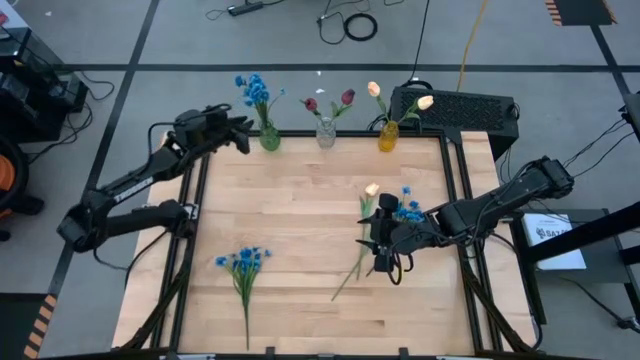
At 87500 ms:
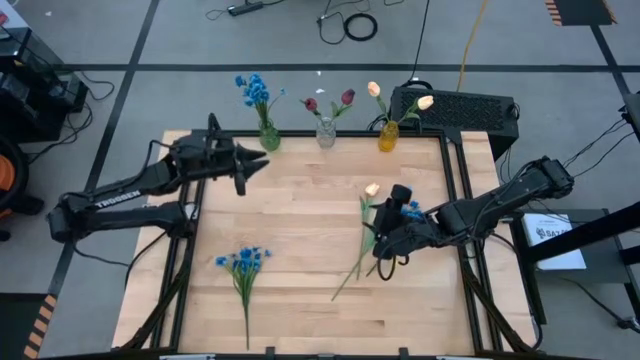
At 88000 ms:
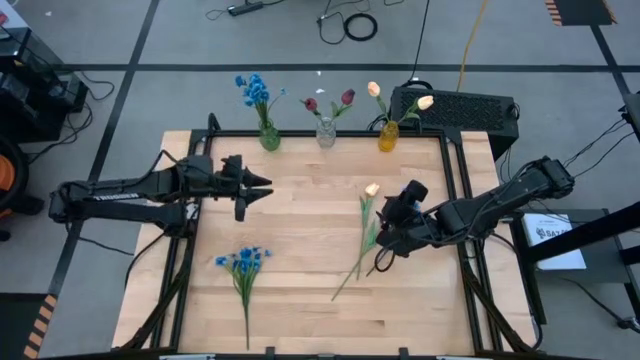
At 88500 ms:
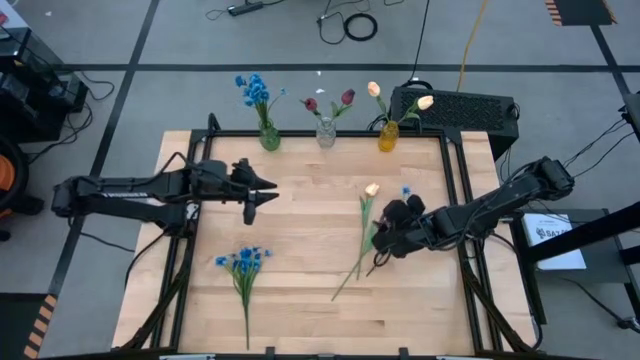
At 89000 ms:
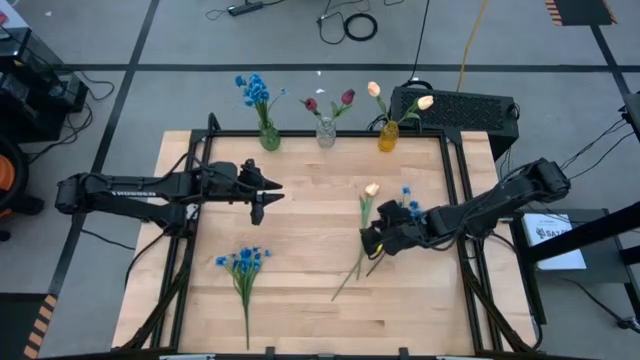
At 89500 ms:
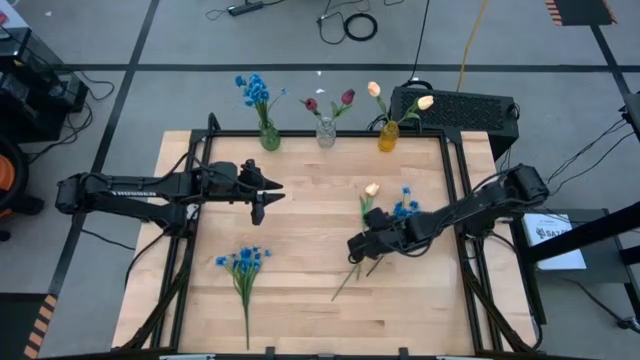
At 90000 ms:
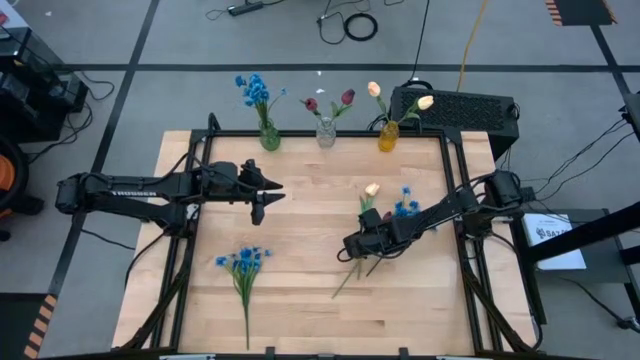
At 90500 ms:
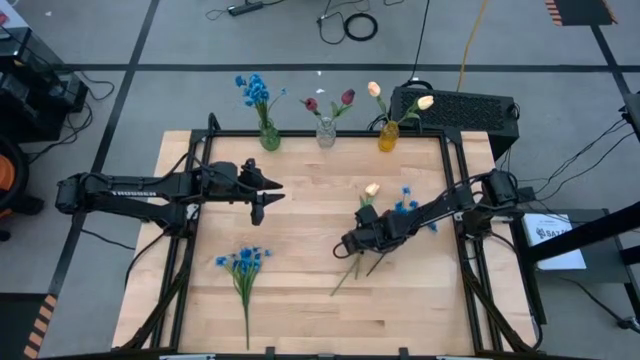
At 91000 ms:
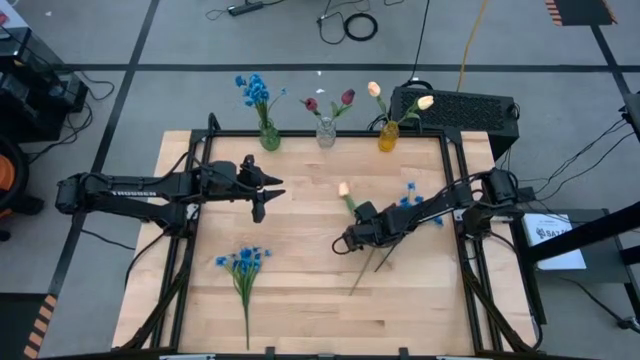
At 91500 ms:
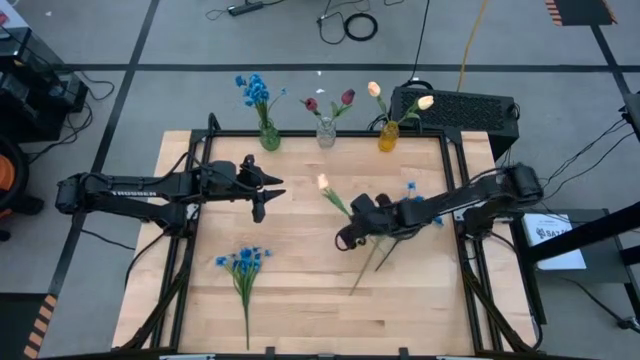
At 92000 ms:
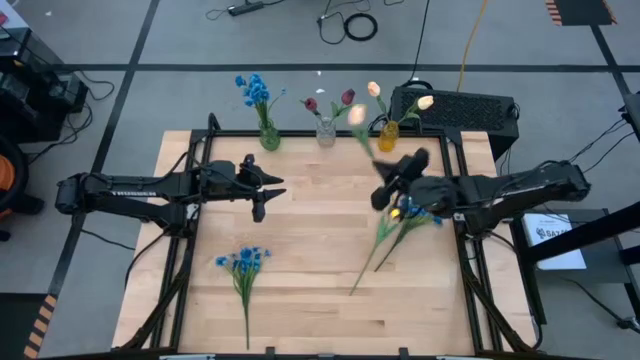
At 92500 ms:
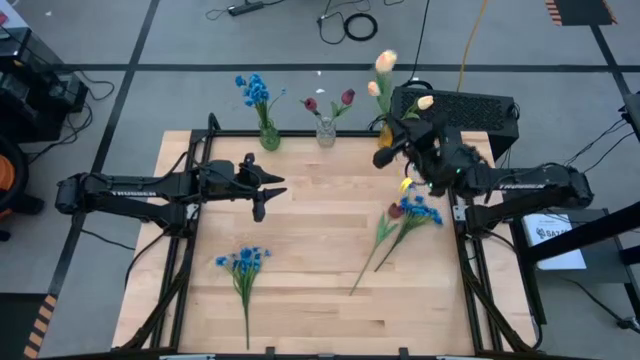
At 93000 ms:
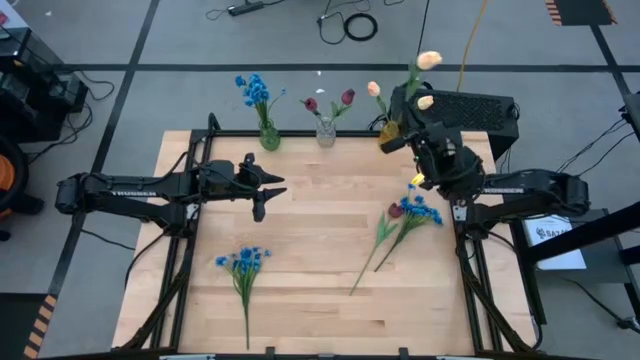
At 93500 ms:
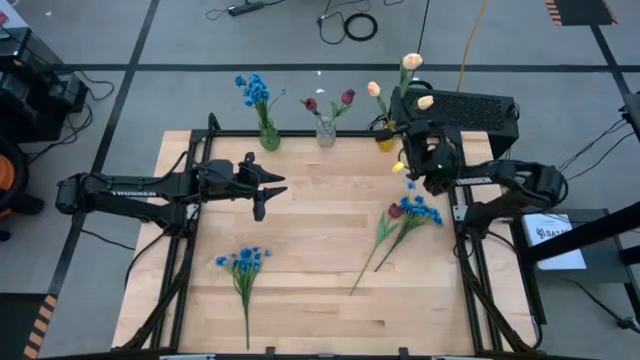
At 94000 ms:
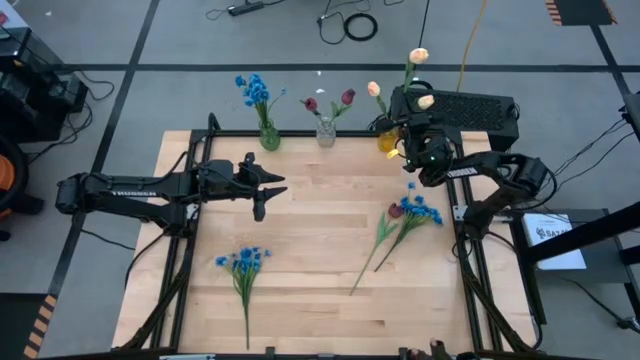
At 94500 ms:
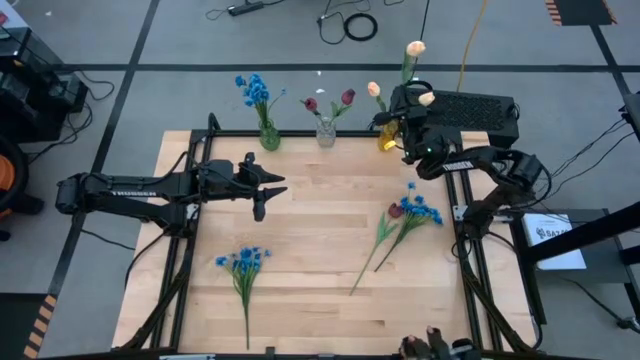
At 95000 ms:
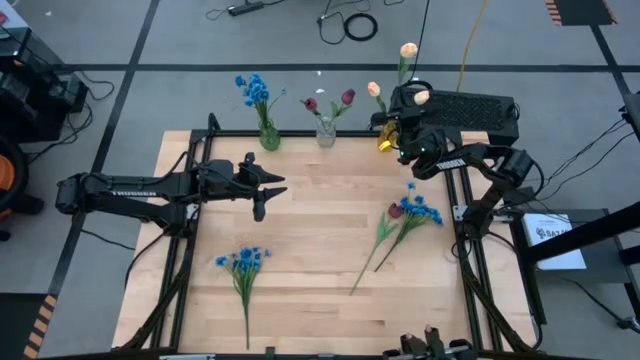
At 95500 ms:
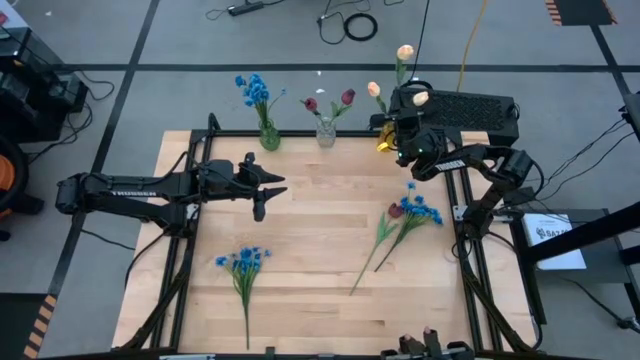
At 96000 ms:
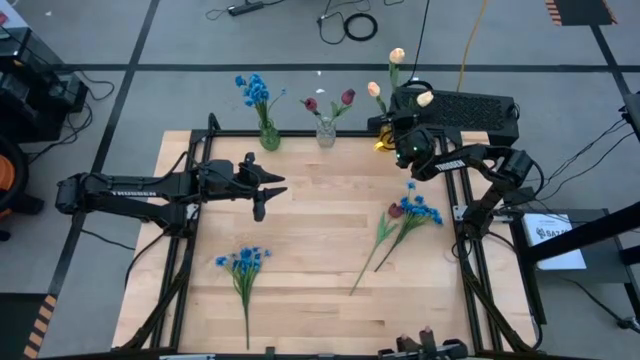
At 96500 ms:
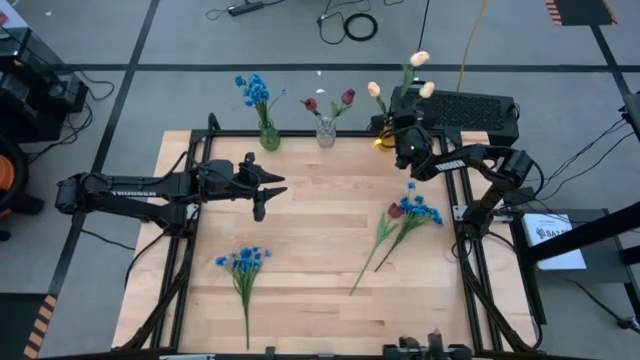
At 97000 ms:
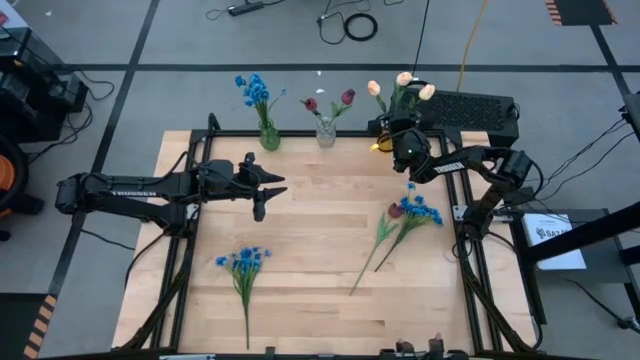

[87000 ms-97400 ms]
Task: Sort flowers into vase by color
Put the yellow tulip into the orange vase

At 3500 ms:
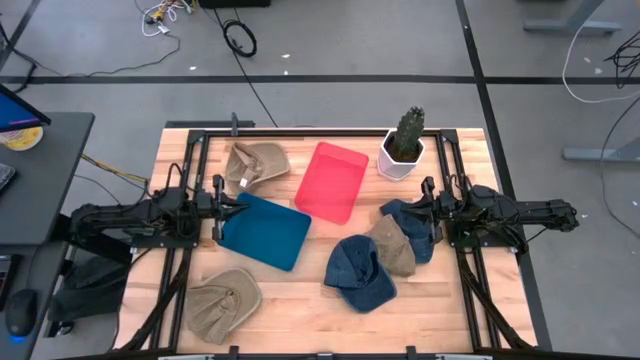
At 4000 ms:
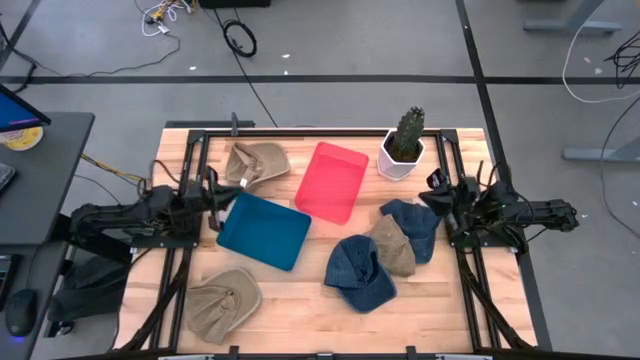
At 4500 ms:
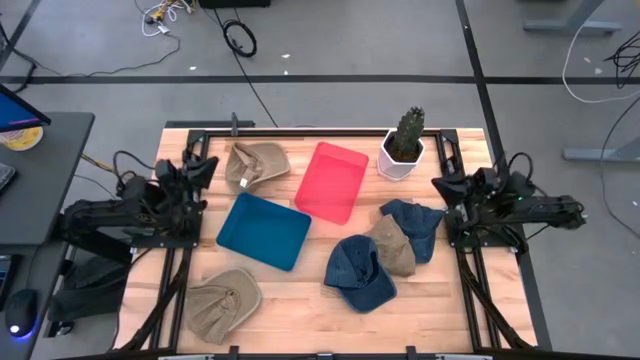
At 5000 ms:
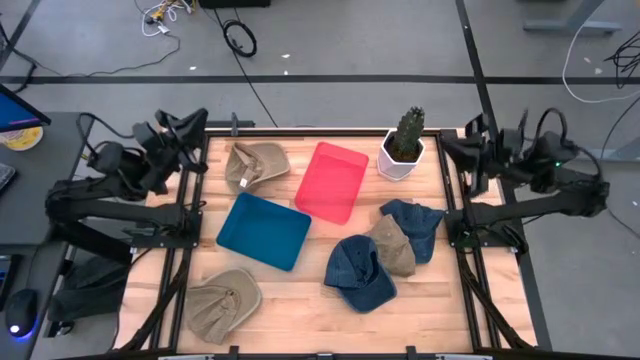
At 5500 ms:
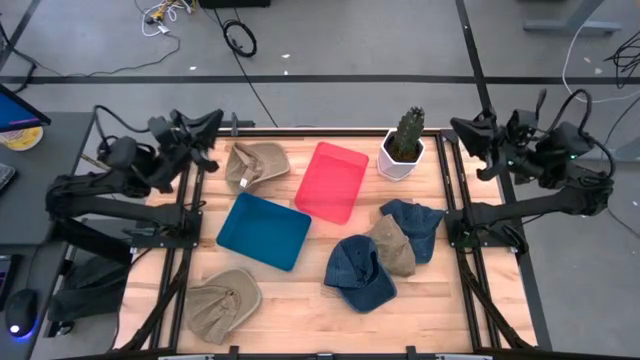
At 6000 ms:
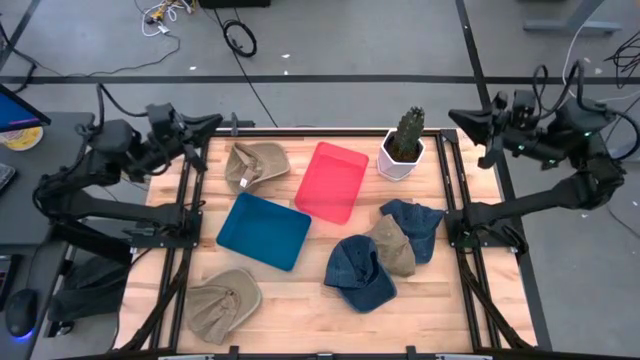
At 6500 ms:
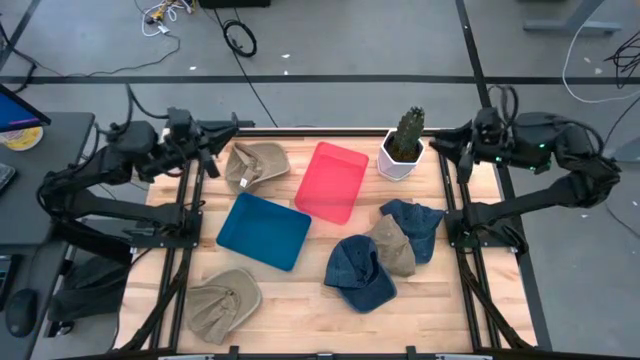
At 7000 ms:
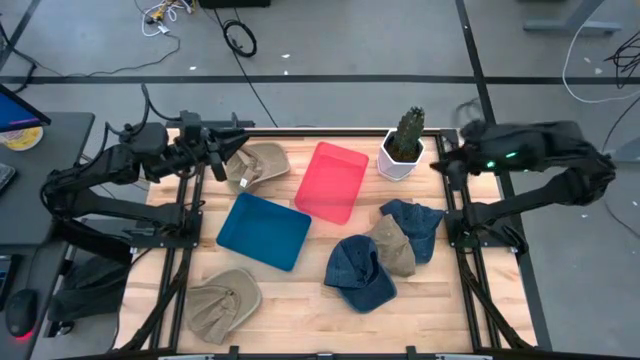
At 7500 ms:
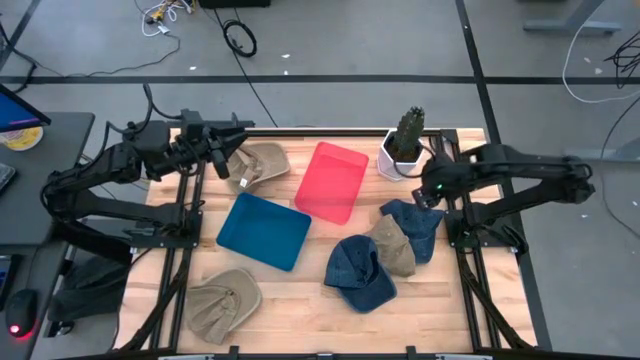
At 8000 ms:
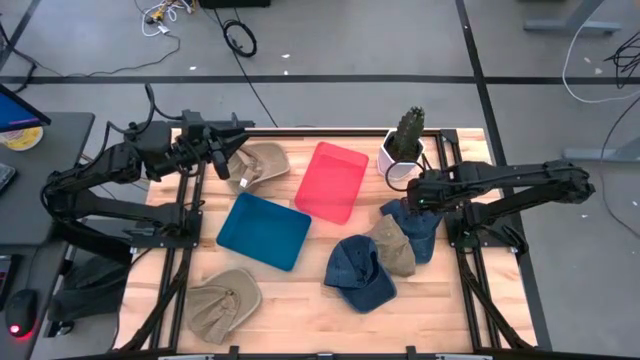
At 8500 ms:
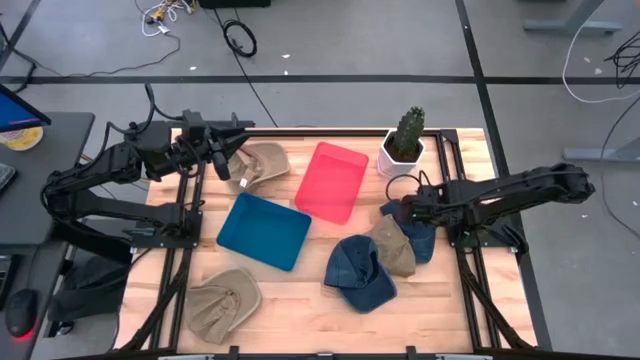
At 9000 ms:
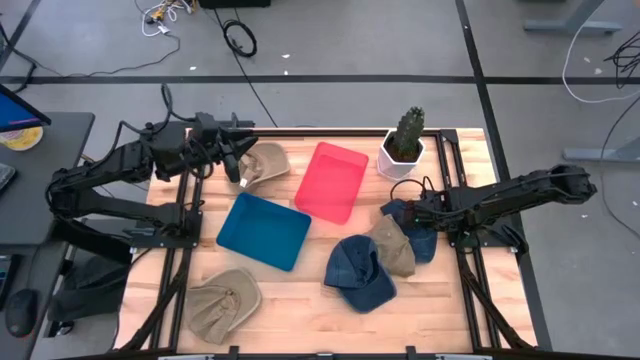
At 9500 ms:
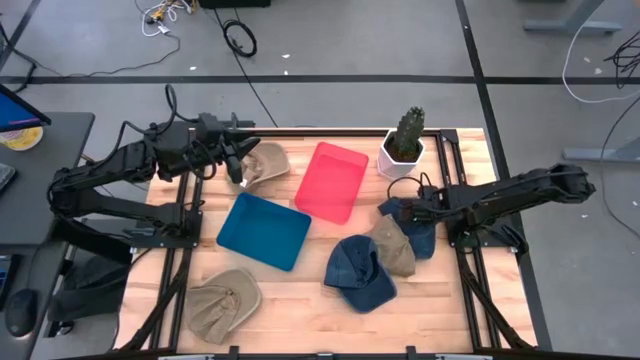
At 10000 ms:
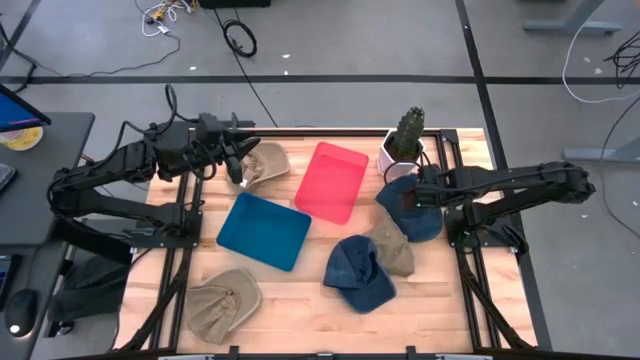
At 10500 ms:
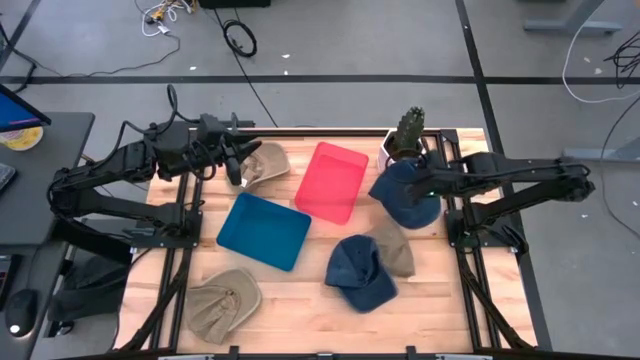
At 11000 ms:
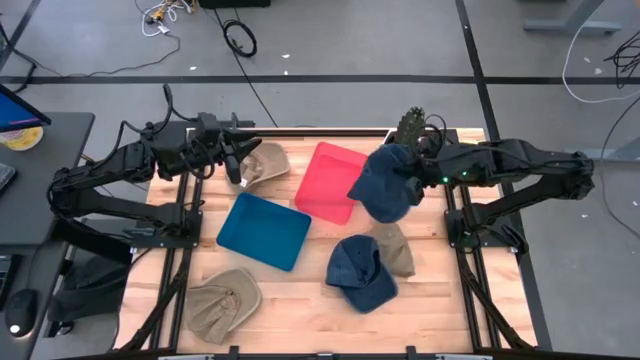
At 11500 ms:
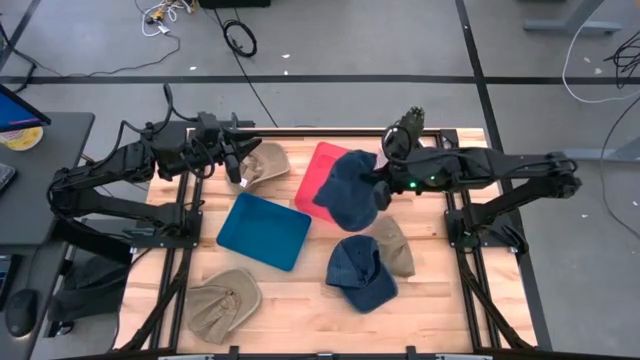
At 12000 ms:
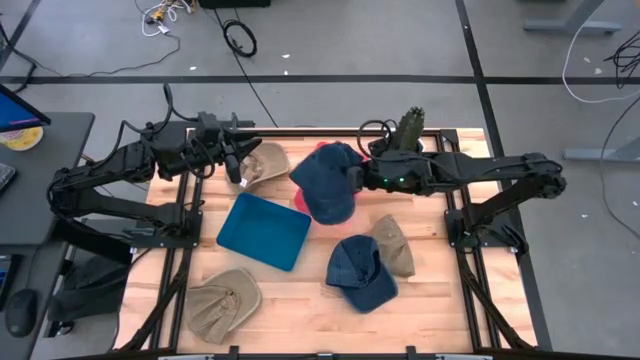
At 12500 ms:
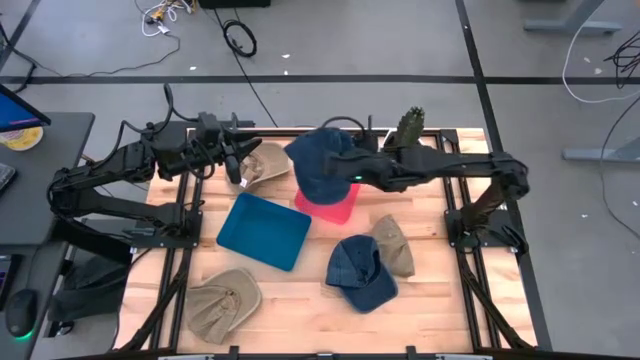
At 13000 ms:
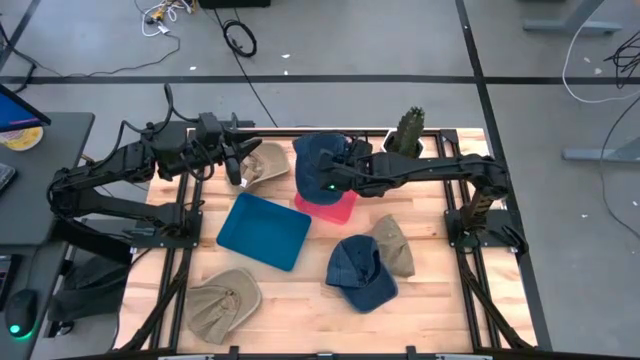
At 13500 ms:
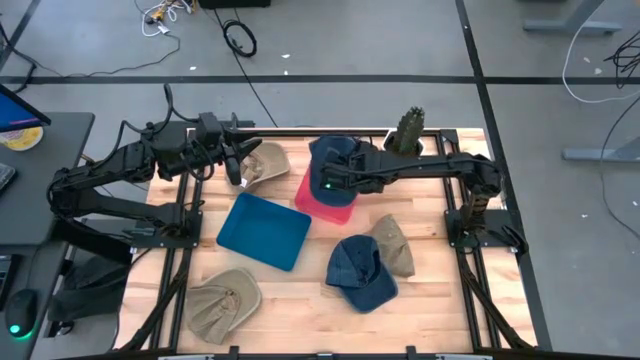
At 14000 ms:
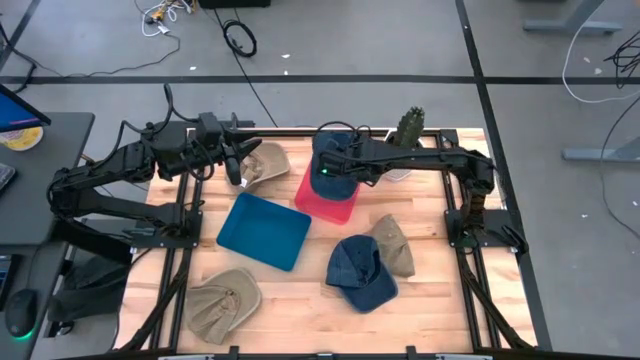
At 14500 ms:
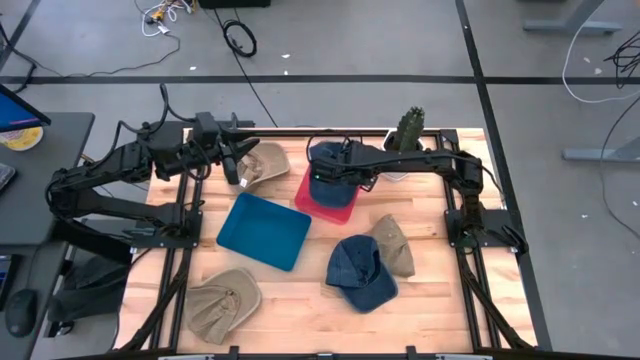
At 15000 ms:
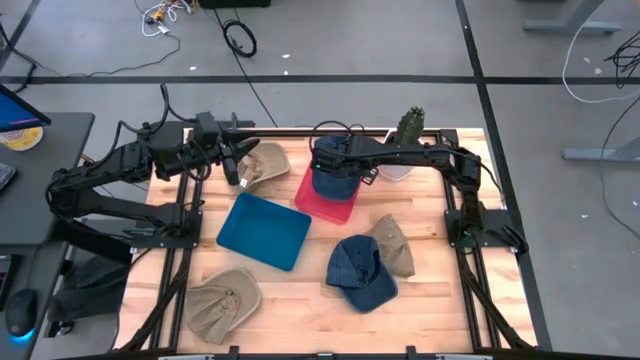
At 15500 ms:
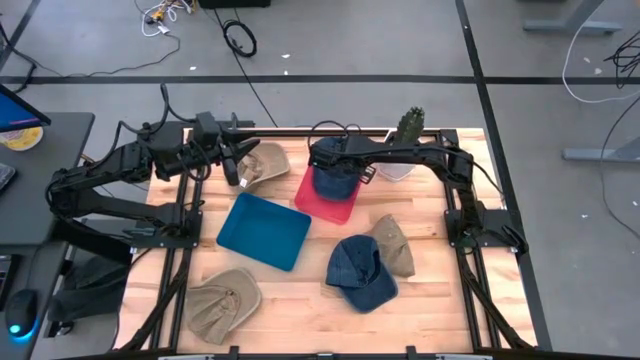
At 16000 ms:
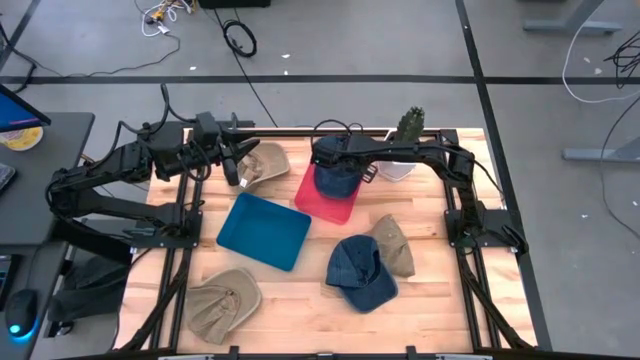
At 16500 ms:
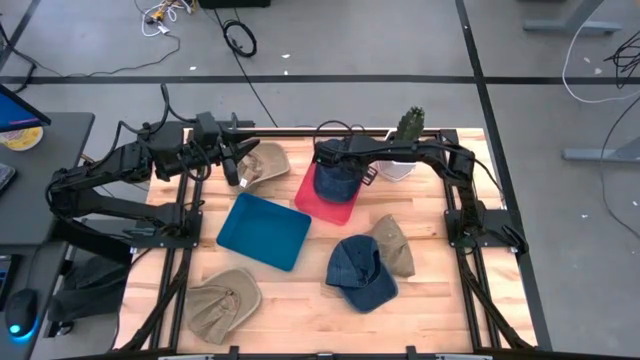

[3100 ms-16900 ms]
Task: Pick & Place hat
Put the right blue cap into the red bin
